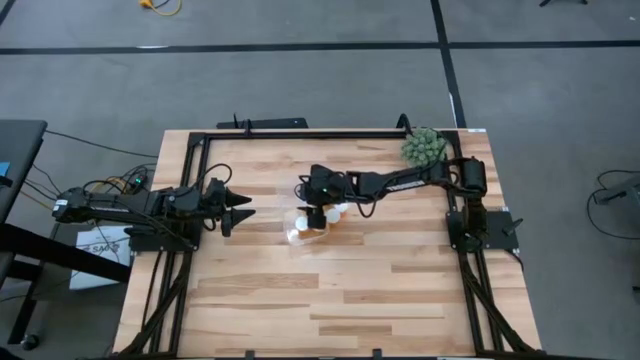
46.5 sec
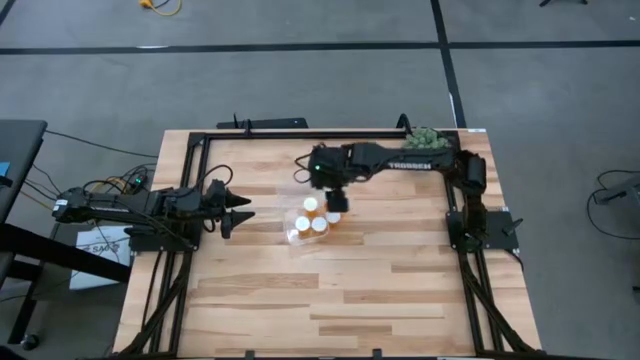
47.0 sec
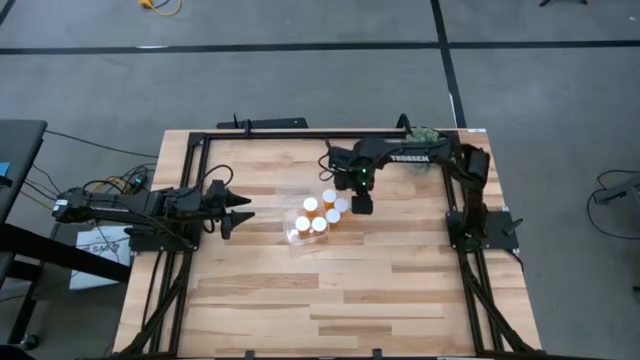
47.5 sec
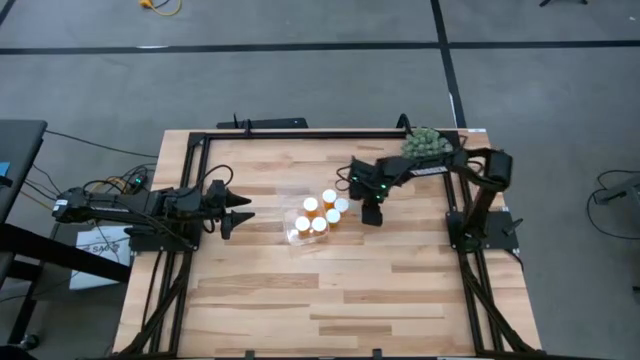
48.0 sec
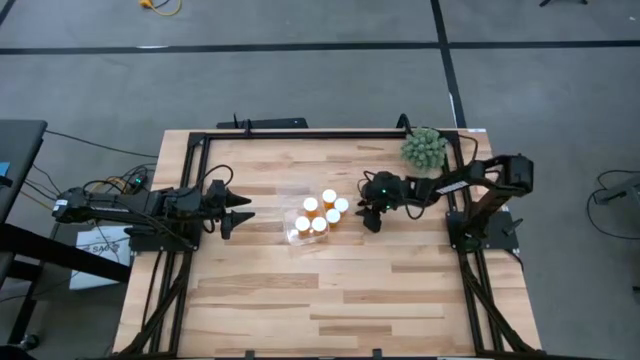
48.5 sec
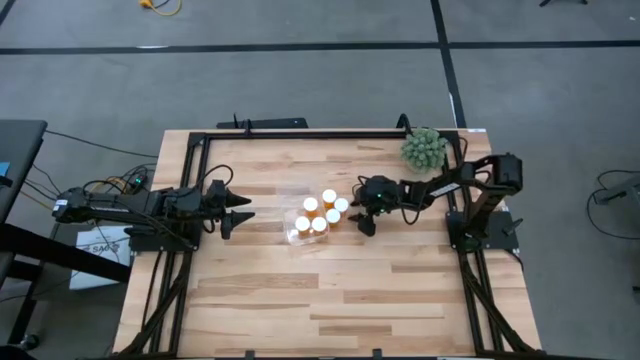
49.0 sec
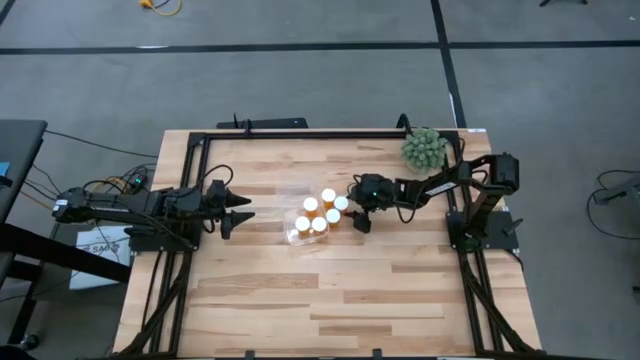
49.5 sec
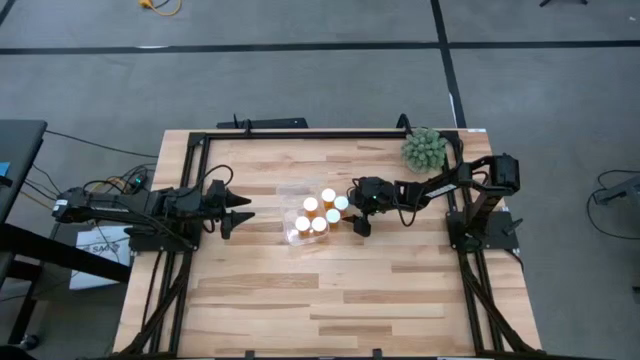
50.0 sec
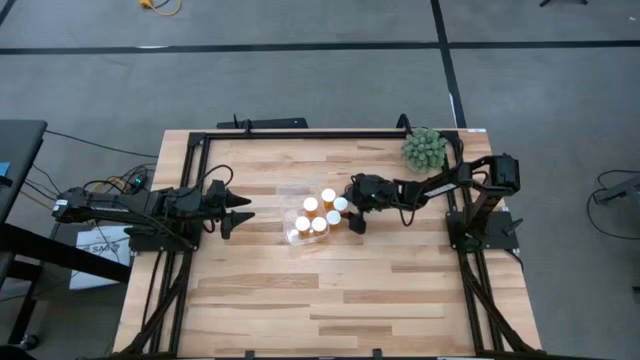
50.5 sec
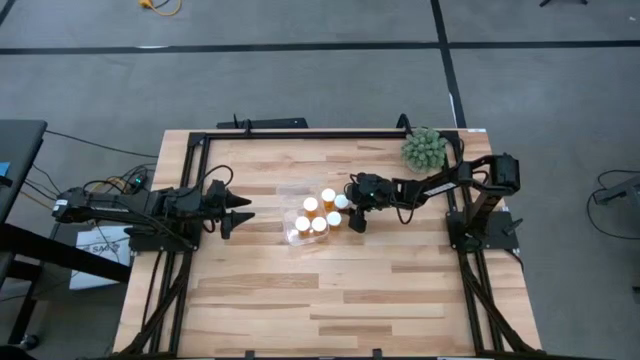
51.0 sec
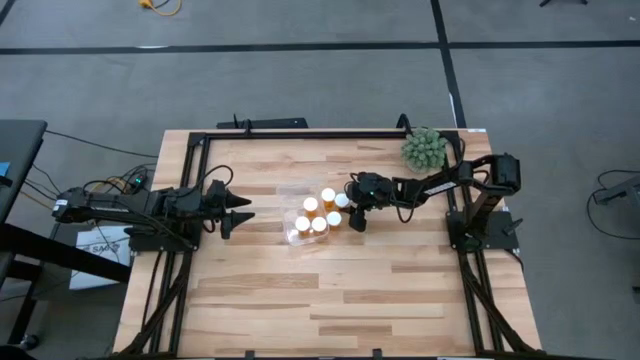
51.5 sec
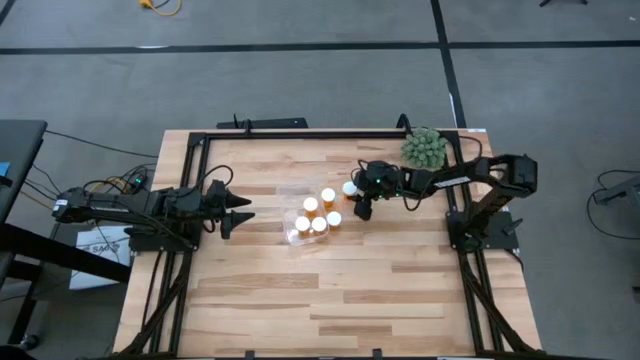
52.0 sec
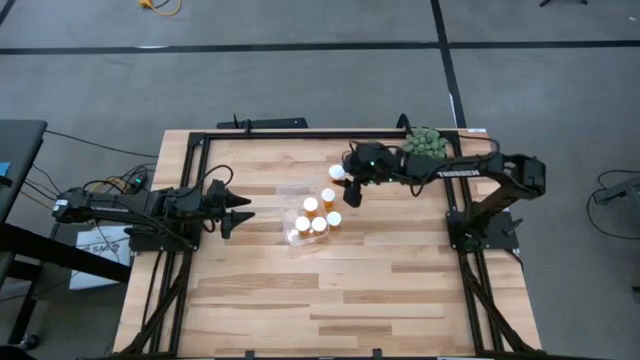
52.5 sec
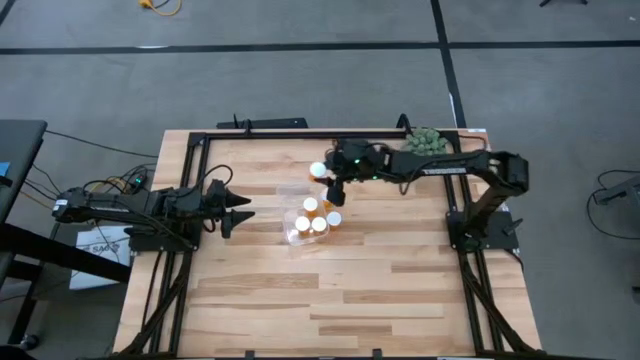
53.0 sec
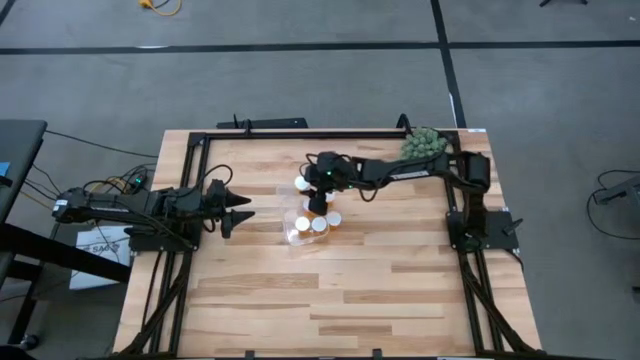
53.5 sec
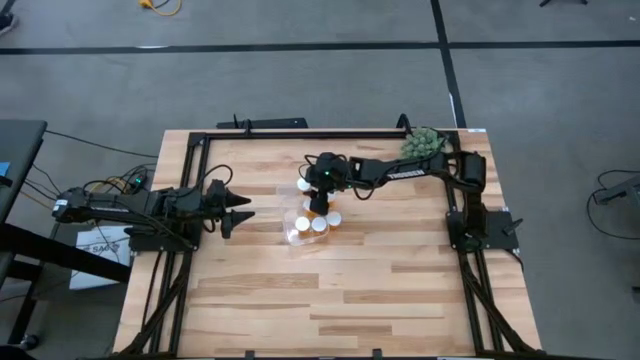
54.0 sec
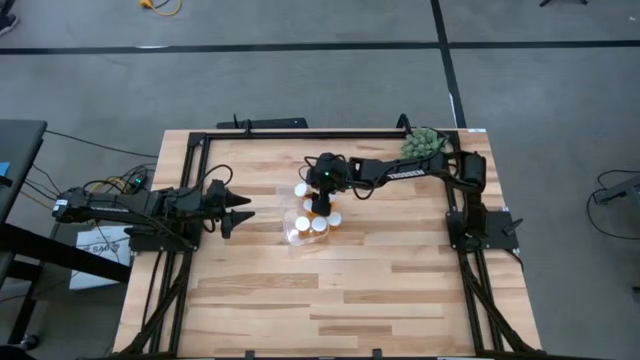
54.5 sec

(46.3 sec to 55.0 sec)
Task: Pick and place pill bottles into a basket
Put the orange pill bottle into the transparent container

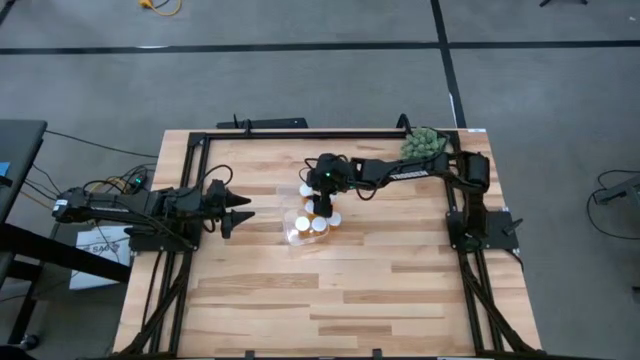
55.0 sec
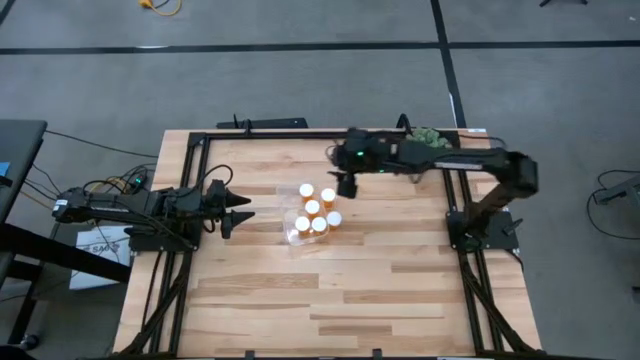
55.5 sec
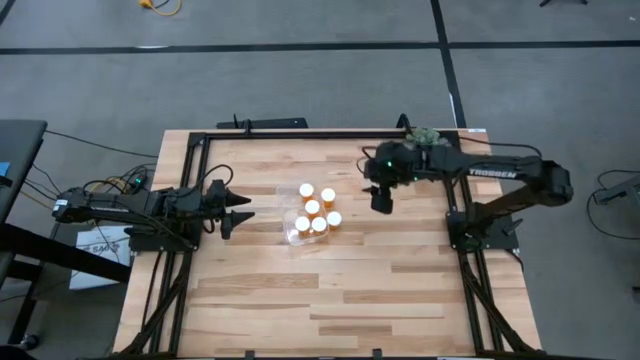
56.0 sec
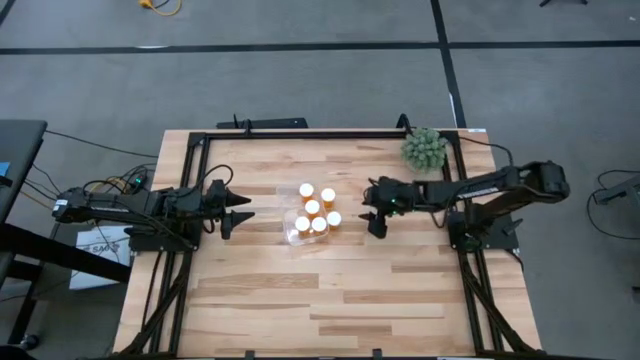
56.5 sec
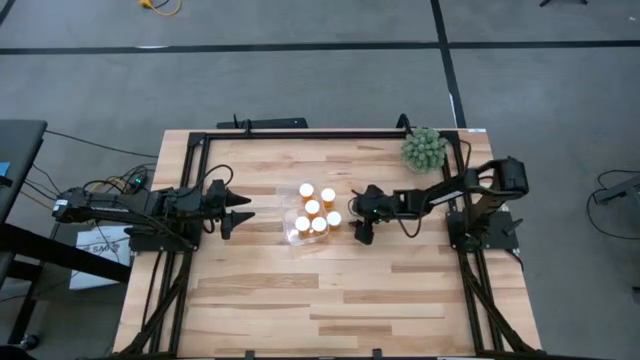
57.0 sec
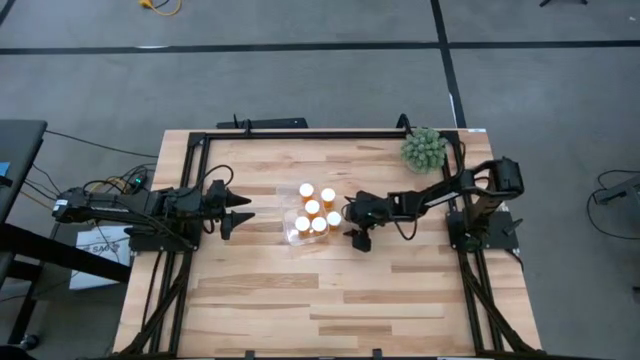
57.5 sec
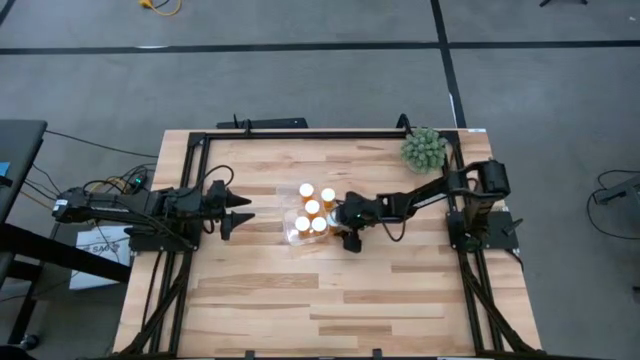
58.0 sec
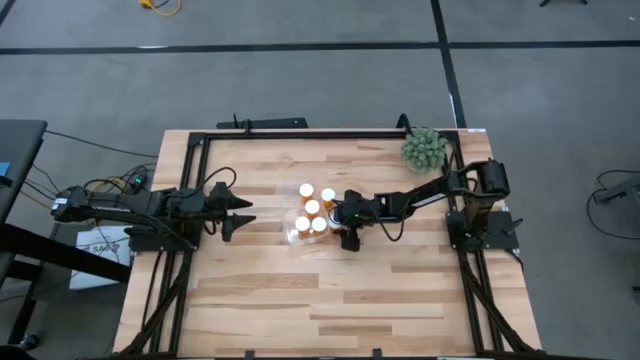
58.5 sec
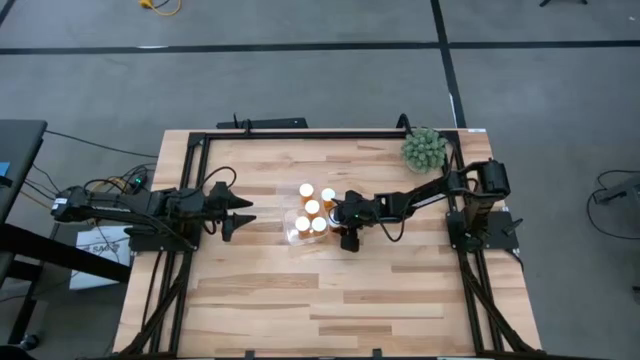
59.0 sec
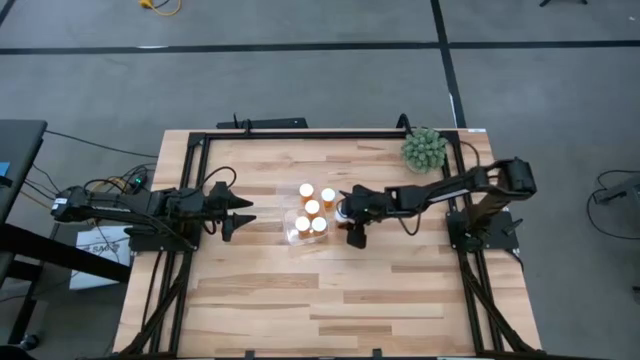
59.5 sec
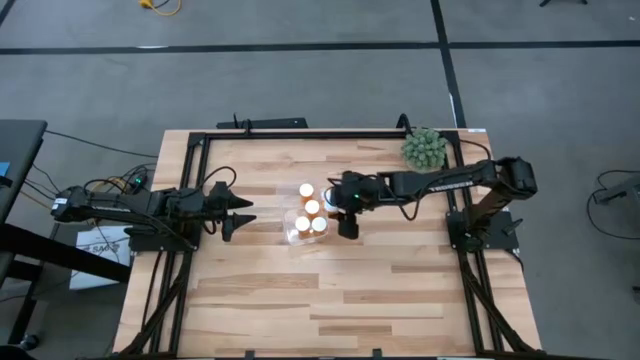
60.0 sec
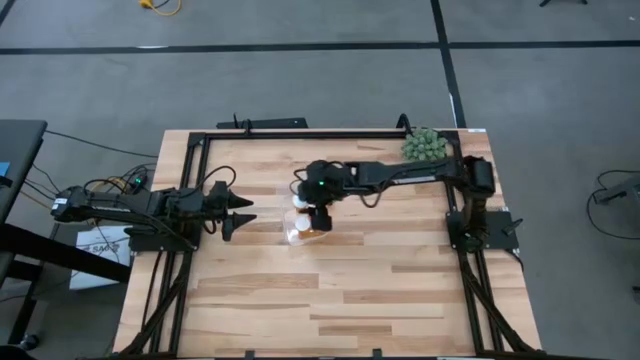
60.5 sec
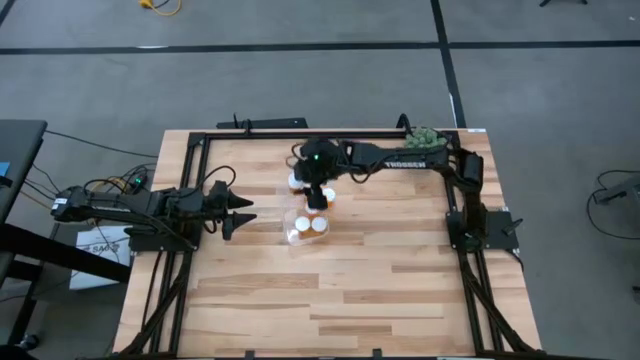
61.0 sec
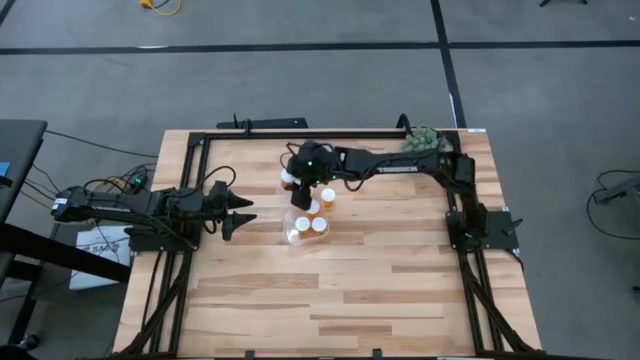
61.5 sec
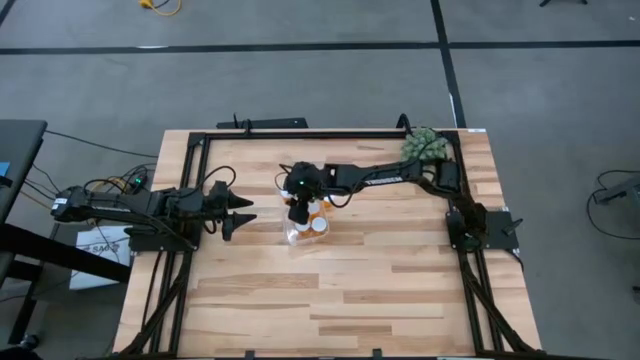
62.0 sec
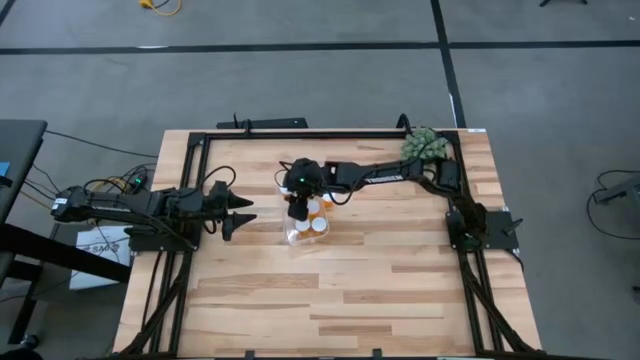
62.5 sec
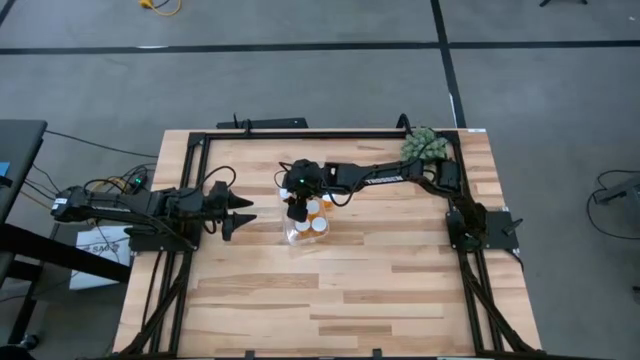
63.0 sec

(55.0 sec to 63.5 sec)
Put the orange pill bottle into the transparent container

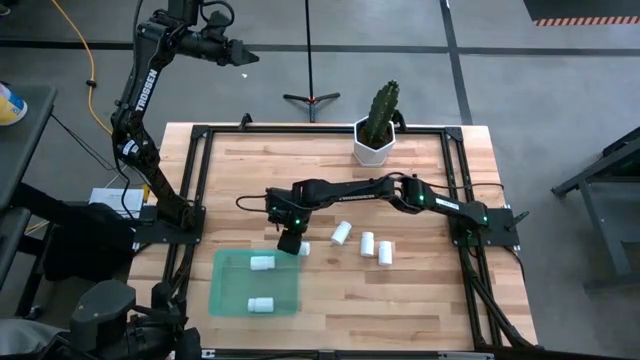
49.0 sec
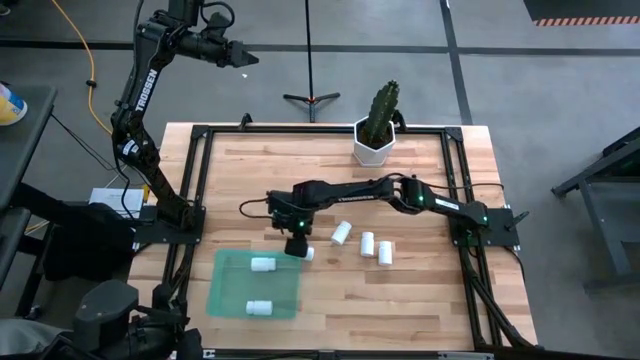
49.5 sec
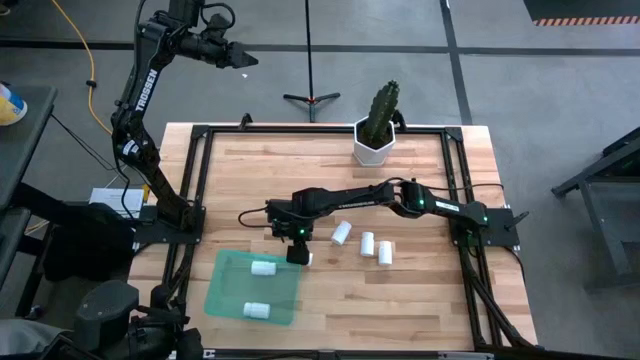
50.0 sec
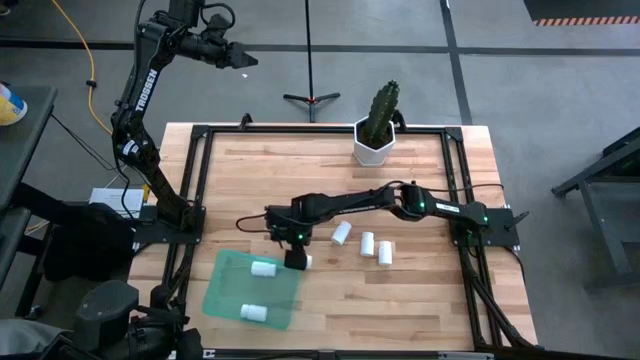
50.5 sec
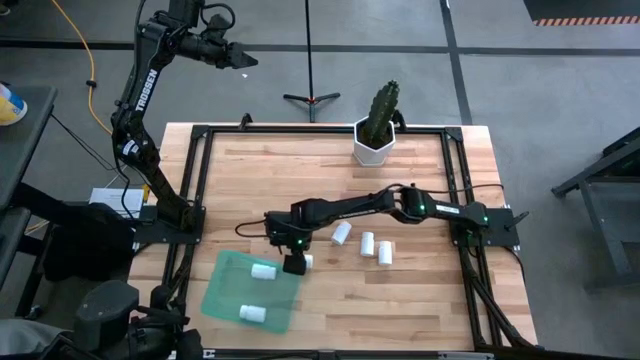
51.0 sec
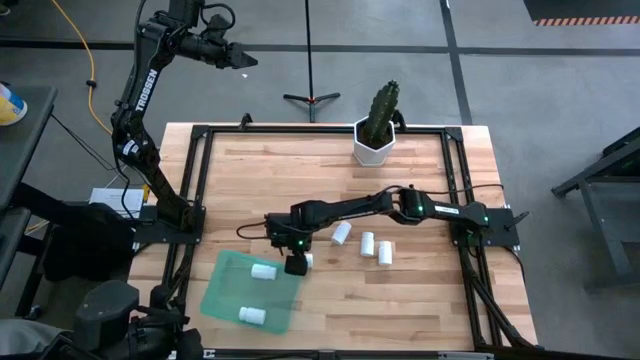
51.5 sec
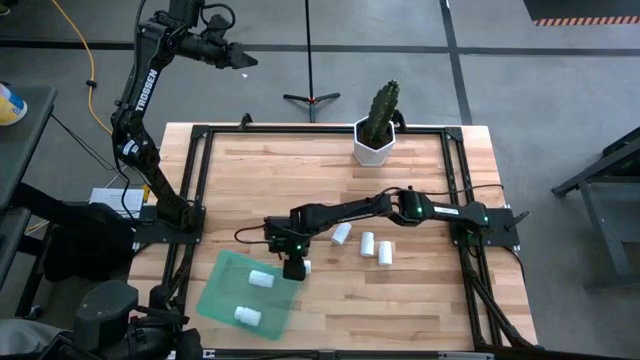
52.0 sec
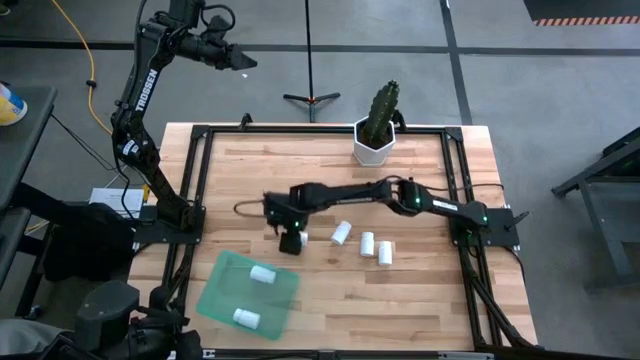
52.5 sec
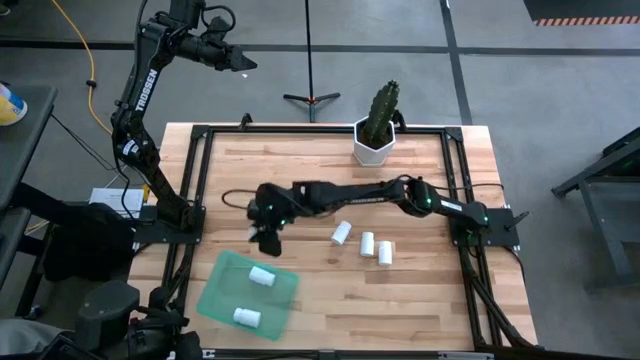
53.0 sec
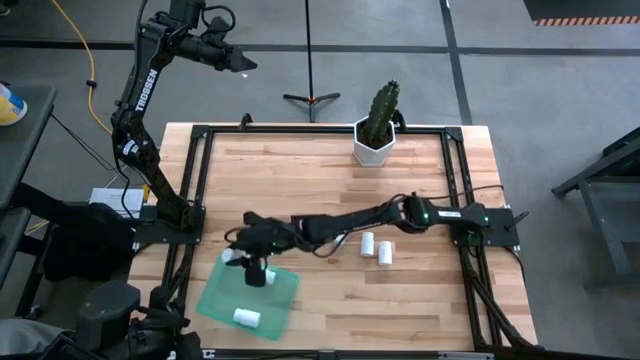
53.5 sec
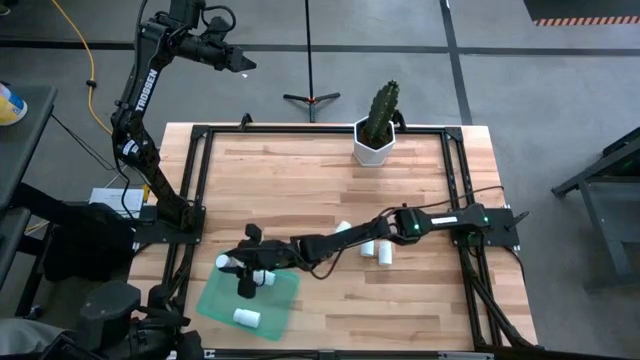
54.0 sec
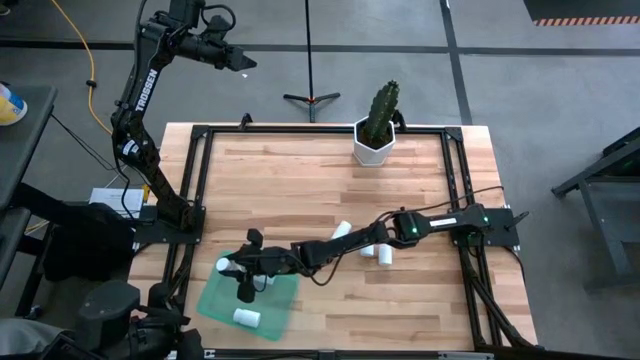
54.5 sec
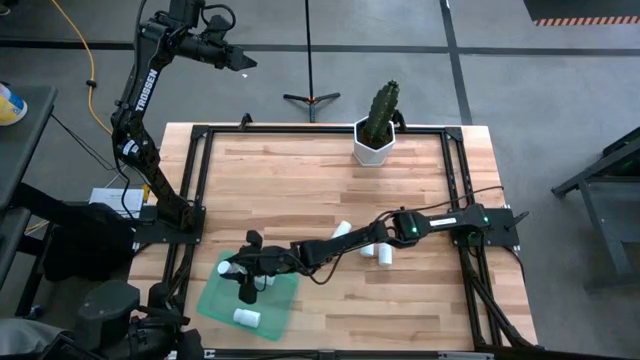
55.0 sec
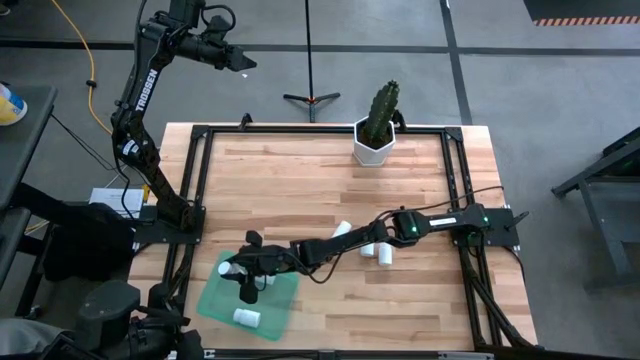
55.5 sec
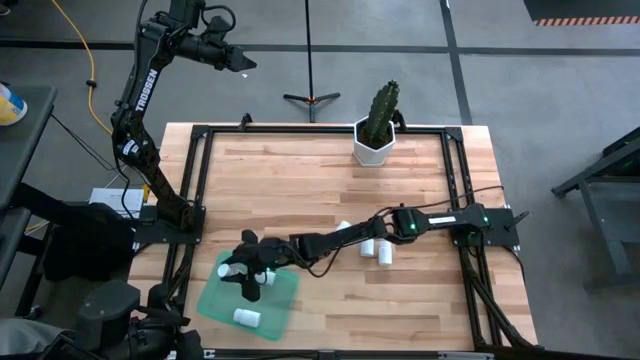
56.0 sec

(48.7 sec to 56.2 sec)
Task: Pick and place pill bottles into a basket
Put the white pill bottle into the green bin
